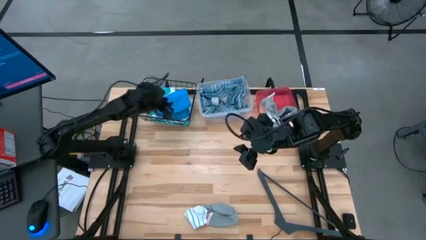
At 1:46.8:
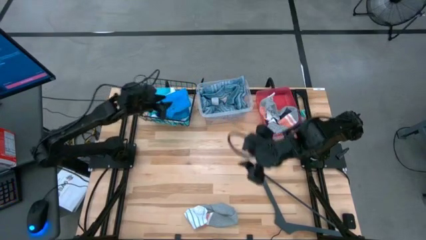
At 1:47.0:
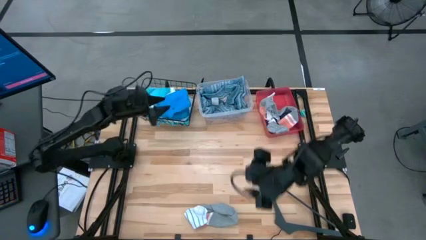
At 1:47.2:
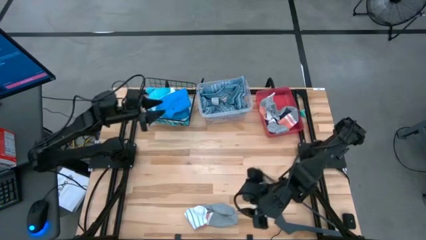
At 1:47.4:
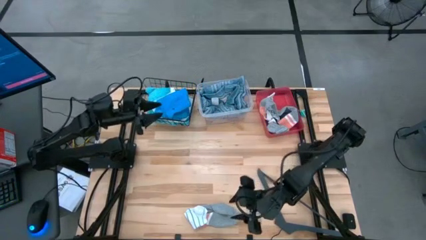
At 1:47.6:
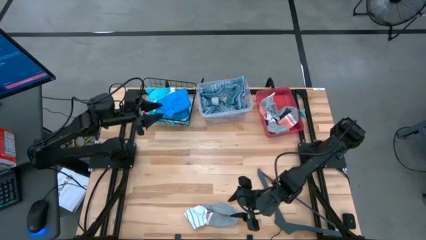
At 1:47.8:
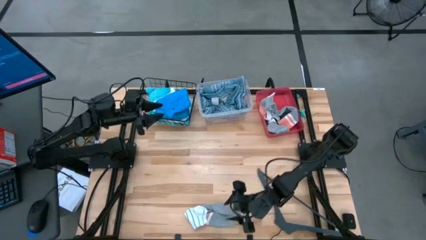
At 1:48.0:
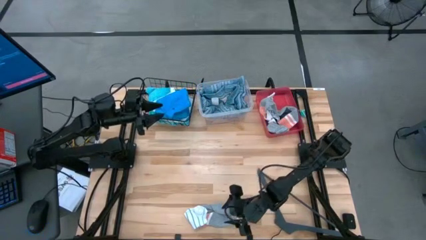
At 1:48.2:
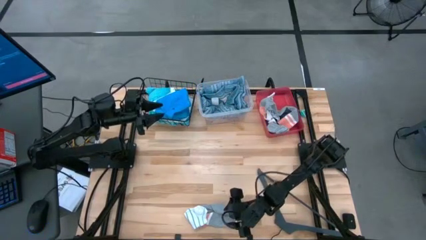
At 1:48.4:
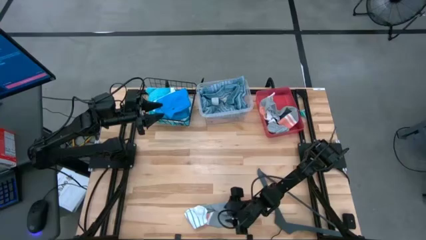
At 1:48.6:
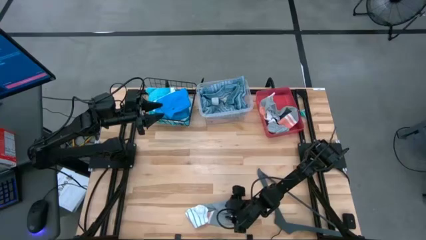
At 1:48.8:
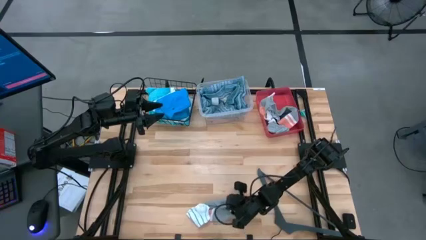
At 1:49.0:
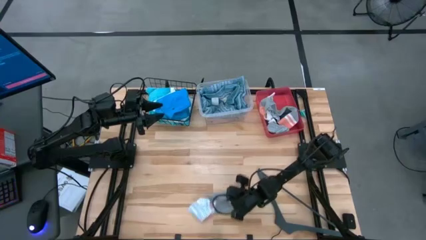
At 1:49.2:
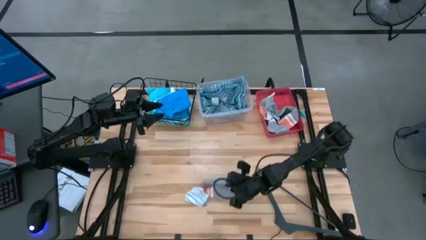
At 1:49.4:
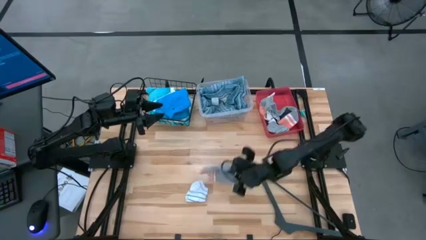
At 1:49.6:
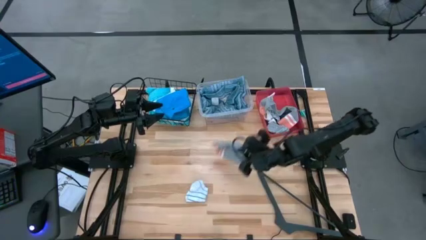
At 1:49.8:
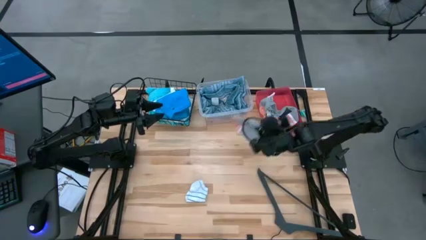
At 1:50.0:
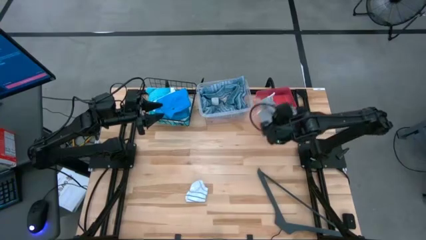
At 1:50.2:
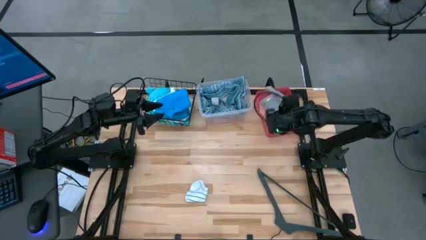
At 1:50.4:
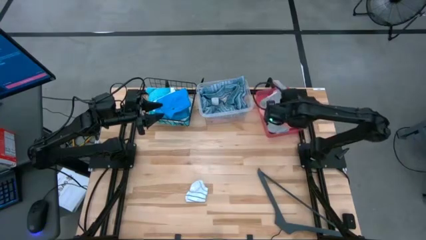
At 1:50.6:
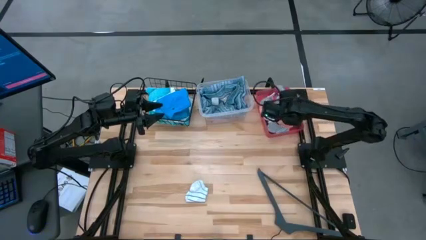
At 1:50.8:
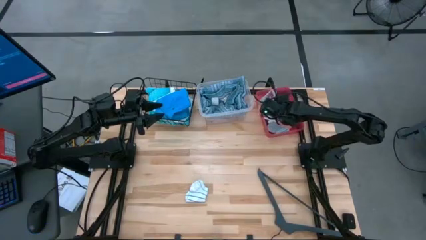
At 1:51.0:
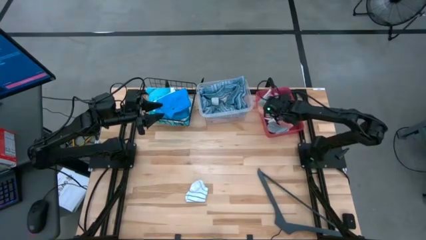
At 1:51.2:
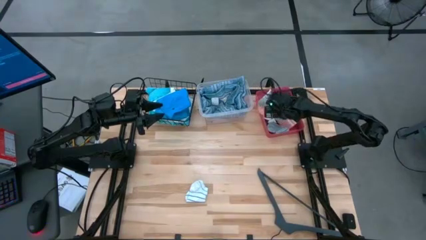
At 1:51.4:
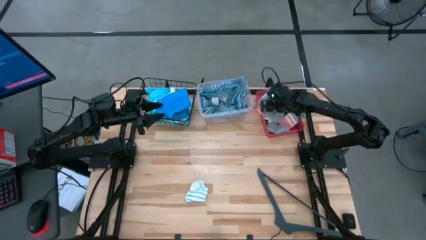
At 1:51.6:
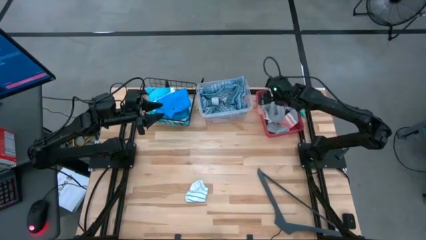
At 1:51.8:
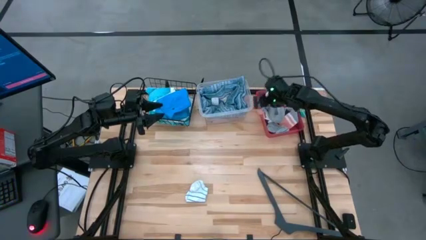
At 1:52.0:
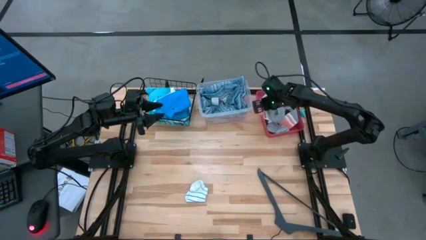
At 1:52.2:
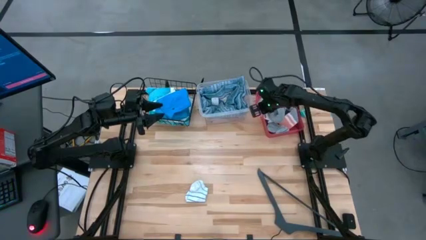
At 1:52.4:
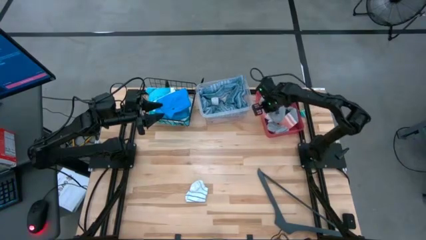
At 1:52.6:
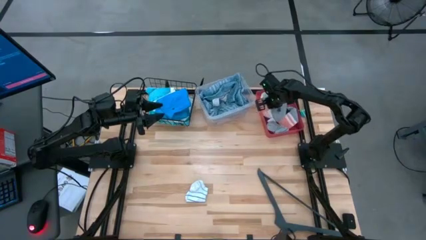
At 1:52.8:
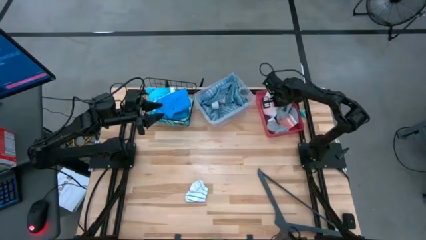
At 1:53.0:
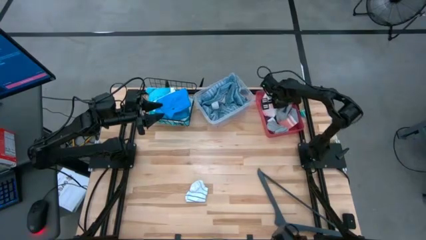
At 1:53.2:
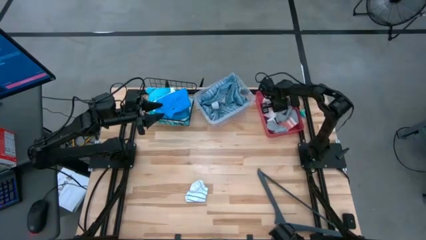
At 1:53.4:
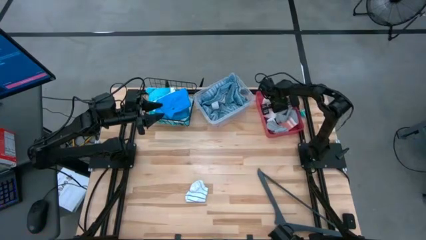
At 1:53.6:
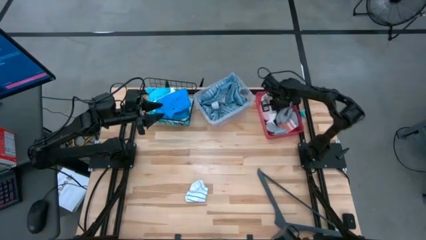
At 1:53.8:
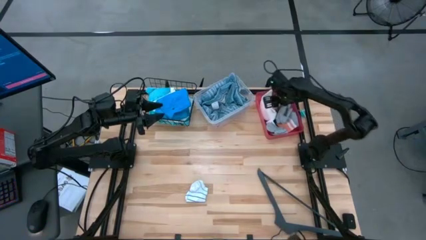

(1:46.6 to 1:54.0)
Task: Pick & Place Cloths
Put the gray sock into the red bin

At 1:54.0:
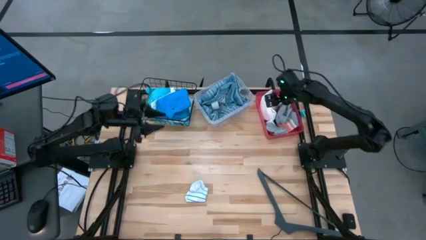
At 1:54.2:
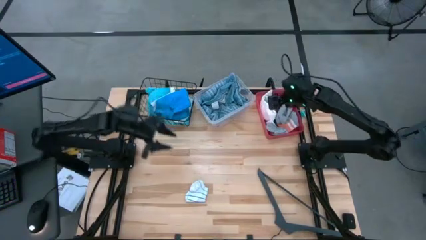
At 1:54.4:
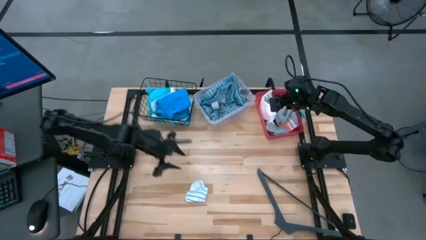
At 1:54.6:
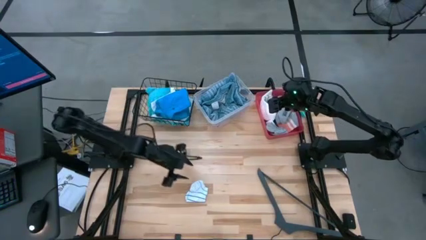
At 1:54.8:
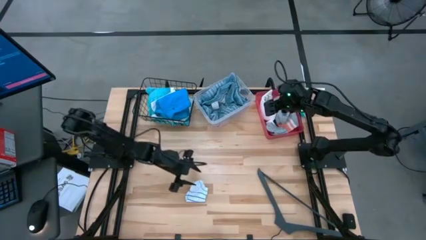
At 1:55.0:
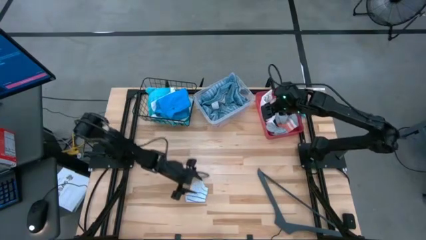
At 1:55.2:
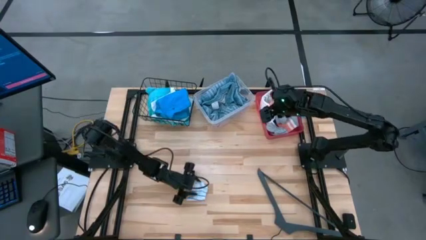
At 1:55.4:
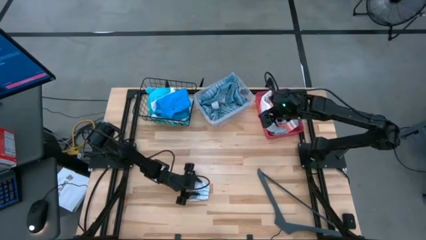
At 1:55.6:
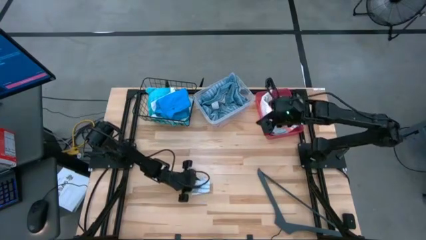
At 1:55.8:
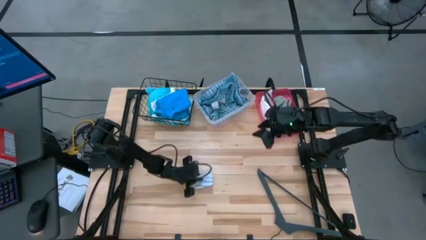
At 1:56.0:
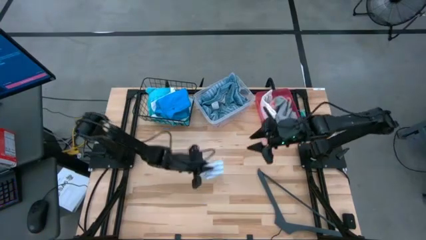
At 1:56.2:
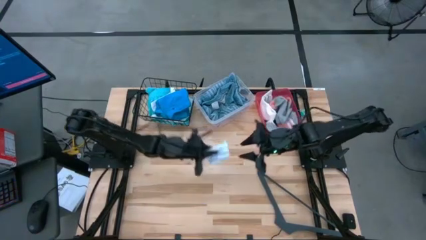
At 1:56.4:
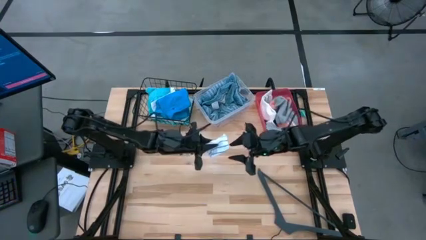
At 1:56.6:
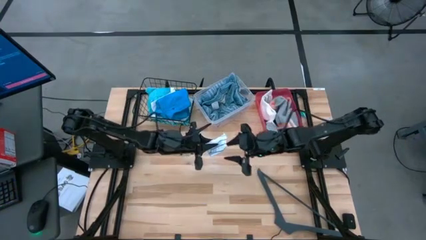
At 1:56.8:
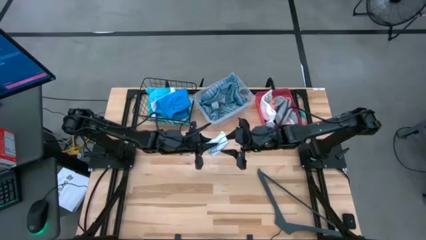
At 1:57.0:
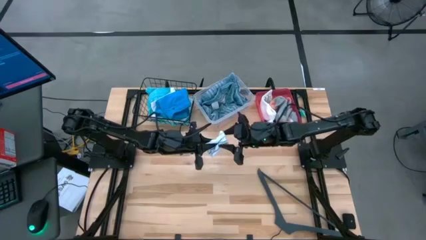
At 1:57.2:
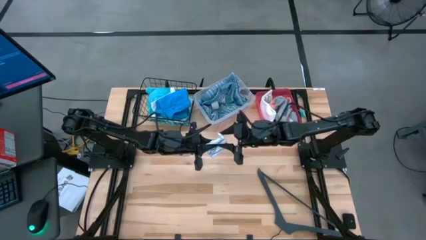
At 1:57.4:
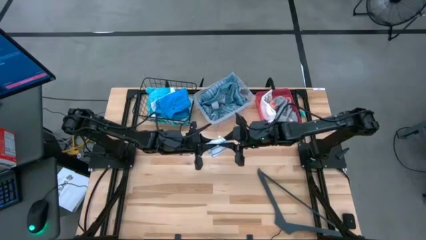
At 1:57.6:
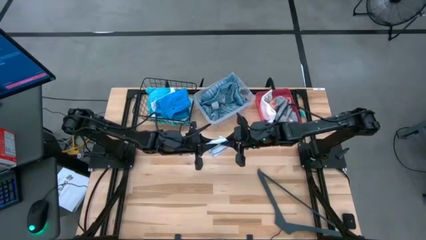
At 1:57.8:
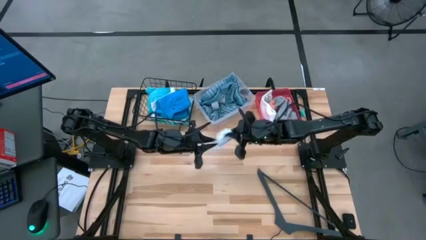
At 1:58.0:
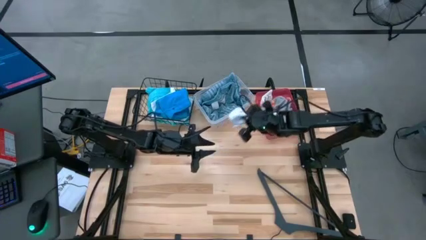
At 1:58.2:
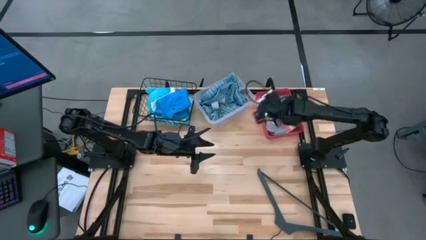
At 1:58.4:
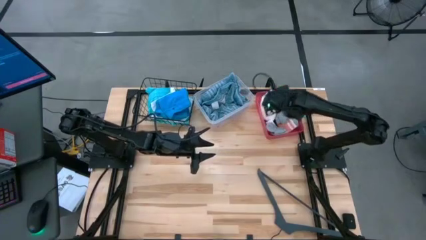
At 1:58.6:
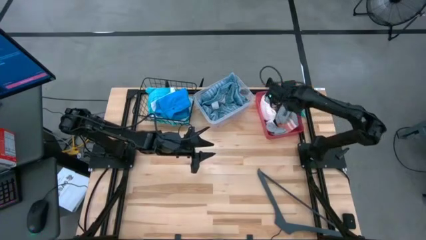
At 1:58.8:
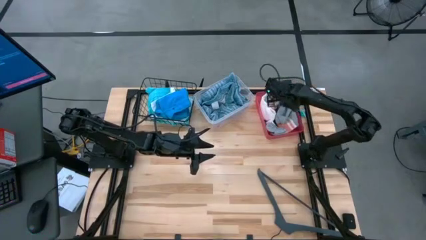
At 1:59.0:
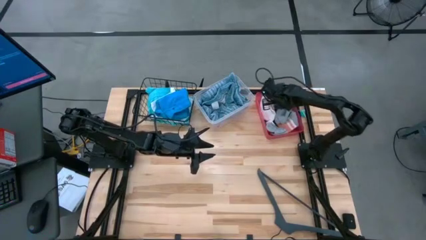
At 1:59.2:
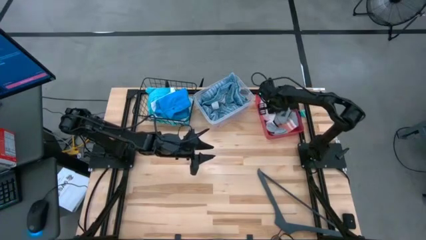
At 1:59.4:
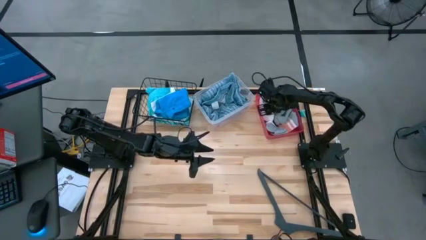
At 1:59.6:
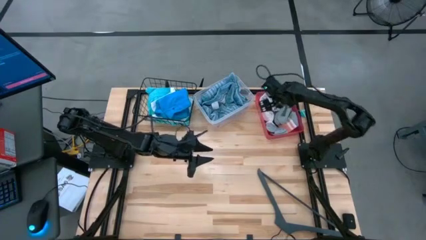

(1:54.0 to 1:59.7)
Put the white patterned sock into the red bin

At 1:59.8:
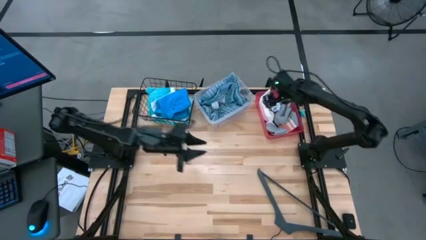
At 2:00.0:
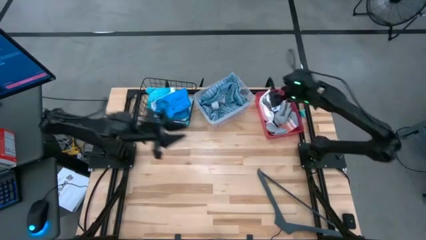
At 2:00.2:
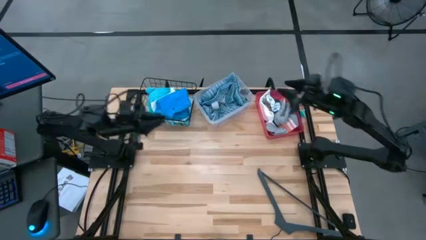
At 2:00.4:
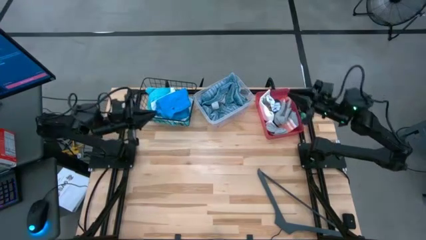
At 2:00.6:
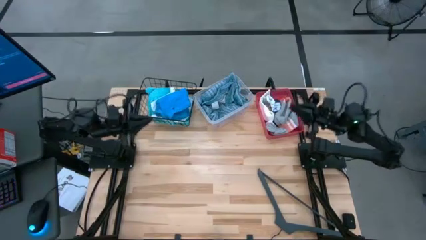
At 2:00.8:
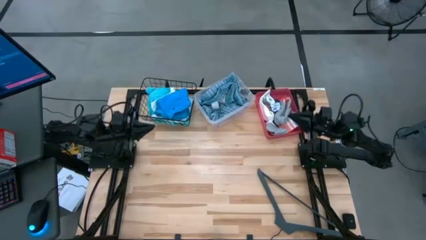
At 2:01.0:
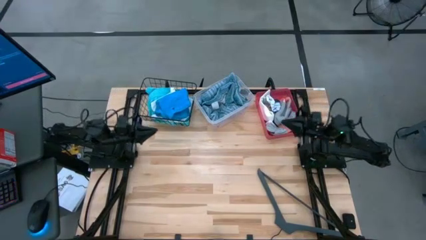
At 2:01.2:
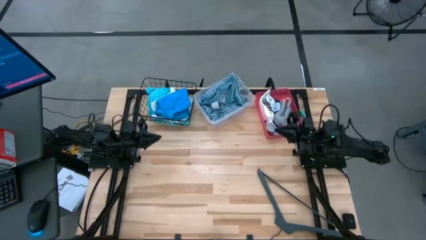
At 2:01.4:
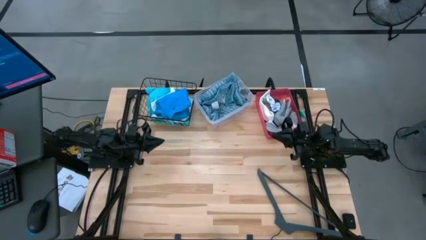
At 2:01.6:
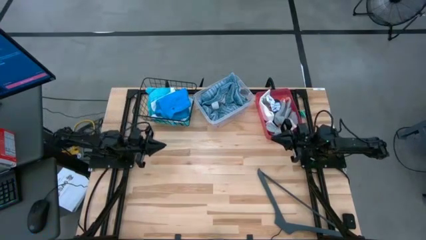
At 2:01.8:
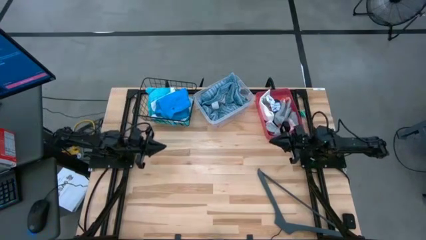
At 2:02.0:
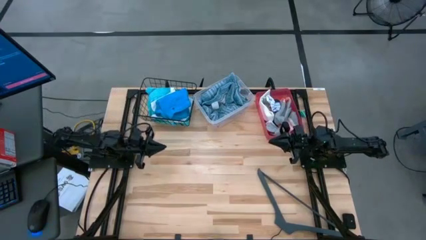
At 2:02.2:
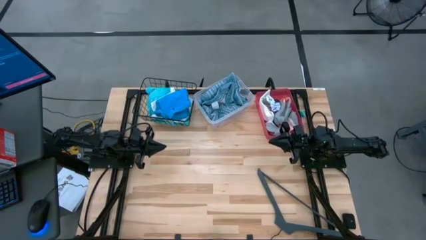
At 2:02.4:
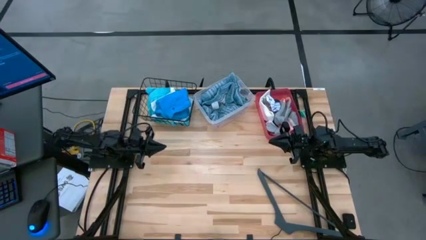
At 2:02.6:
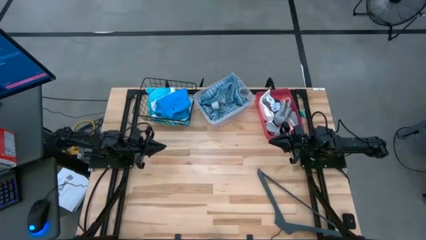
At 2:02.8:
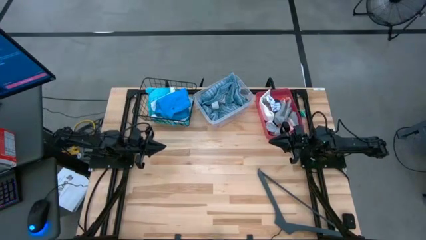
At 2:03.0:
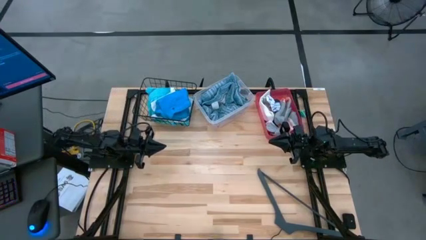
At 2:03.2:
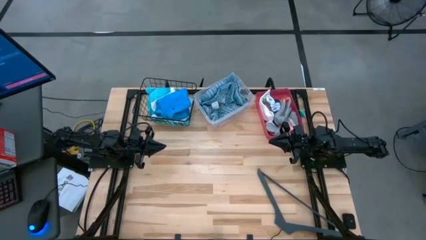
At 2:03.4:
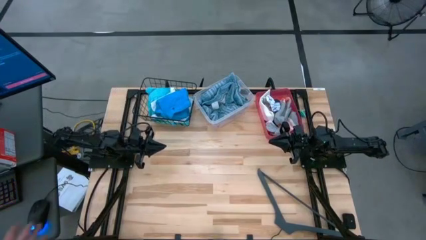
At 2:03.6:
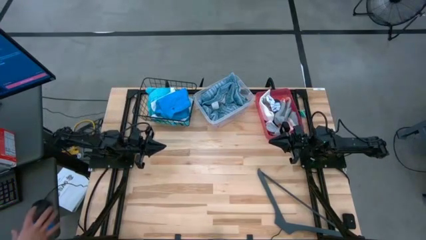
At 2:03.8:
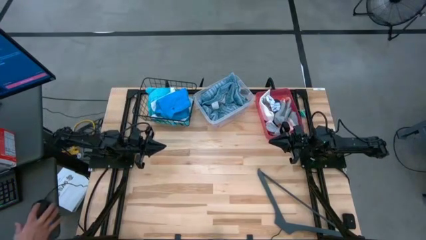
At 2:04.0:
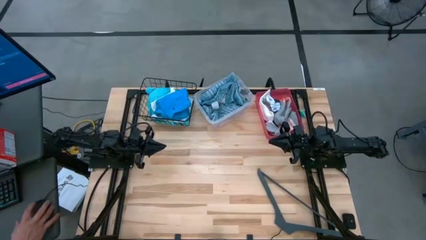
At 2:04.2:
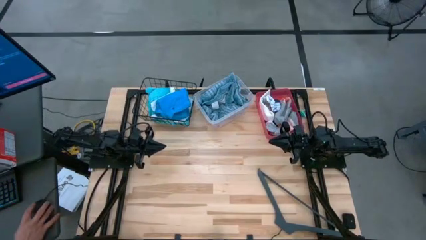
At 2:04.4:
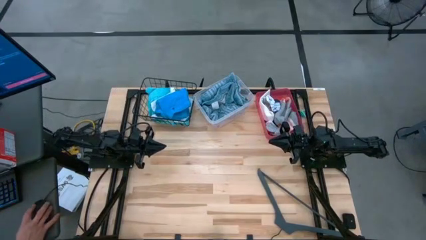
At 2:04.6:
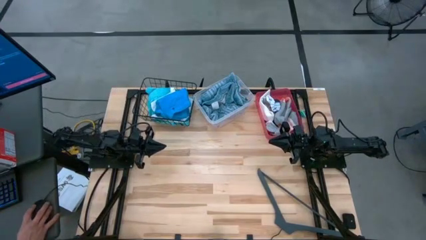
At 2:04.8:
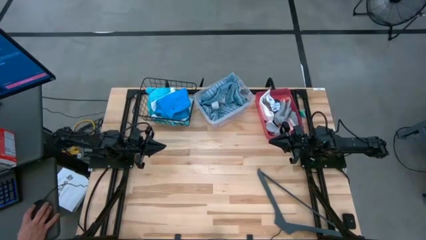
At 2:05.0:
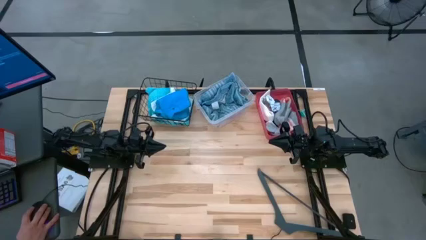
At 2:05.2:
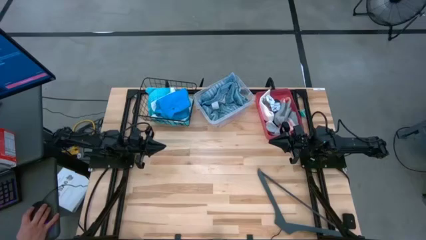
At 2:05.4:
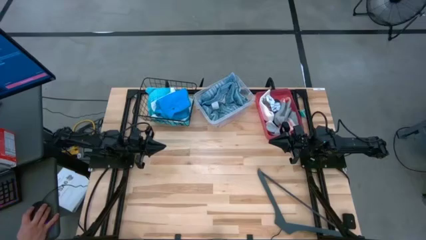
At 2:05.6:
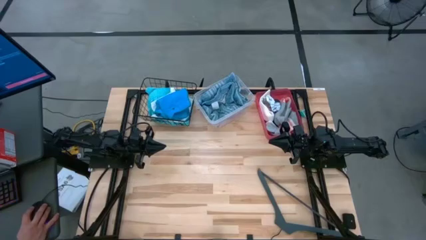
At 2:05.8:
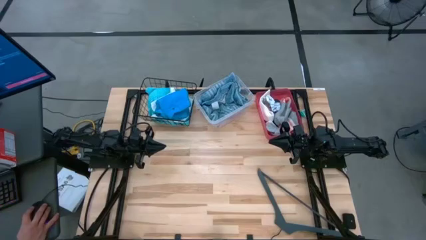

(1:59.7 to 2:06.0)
Return to Home Position
